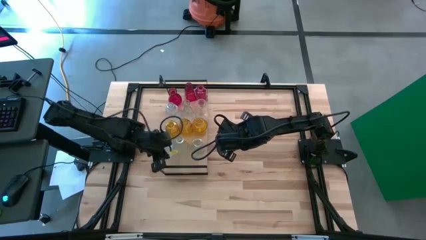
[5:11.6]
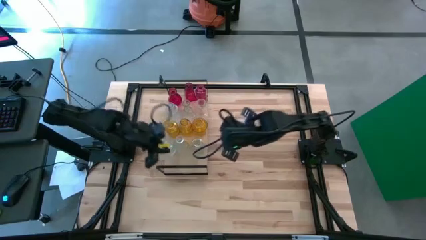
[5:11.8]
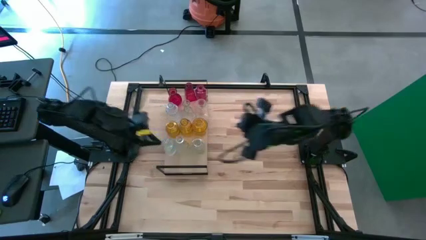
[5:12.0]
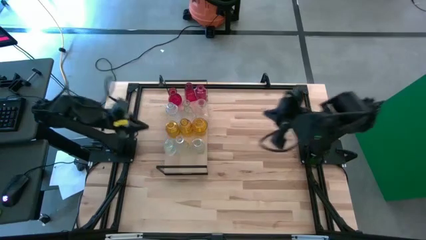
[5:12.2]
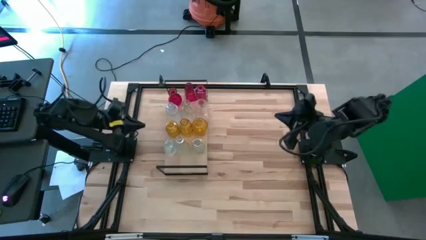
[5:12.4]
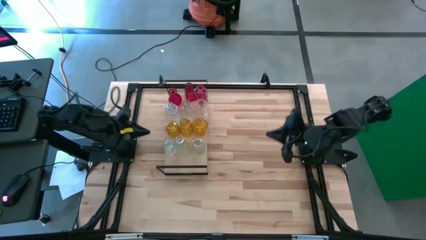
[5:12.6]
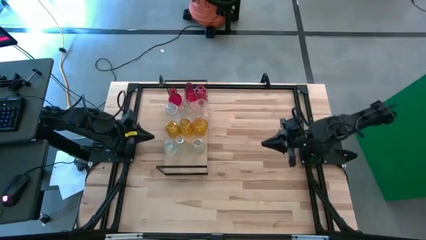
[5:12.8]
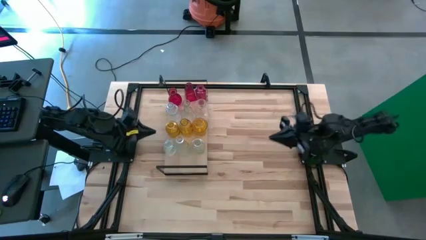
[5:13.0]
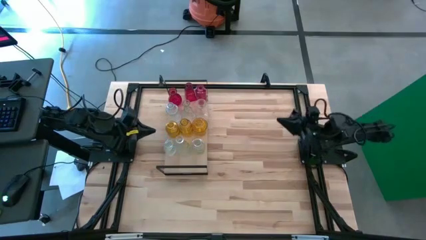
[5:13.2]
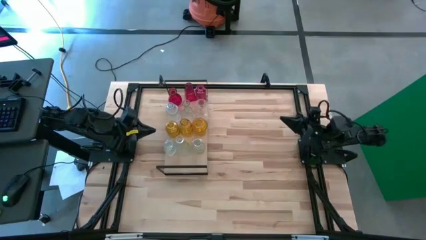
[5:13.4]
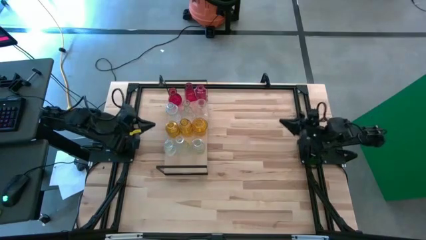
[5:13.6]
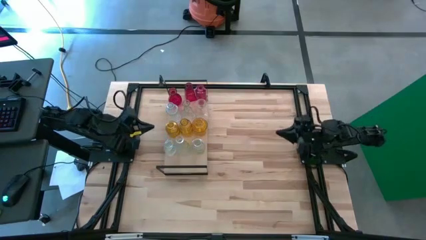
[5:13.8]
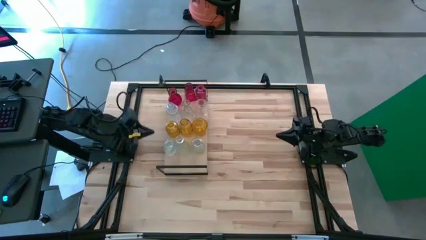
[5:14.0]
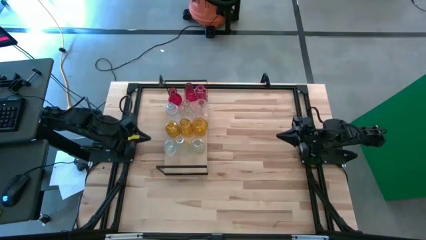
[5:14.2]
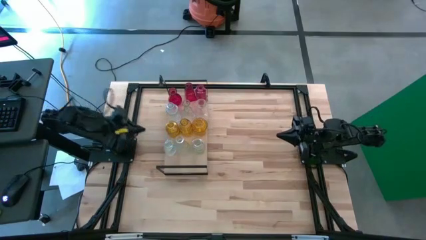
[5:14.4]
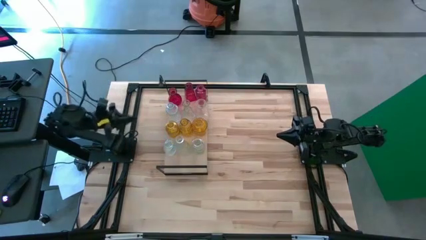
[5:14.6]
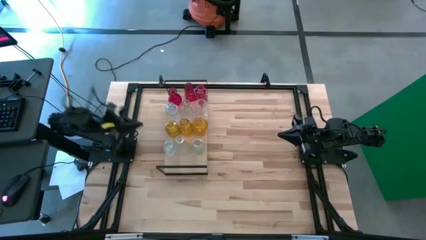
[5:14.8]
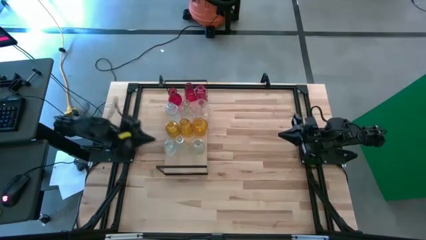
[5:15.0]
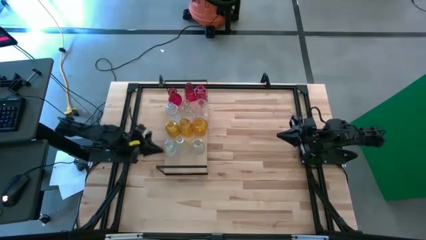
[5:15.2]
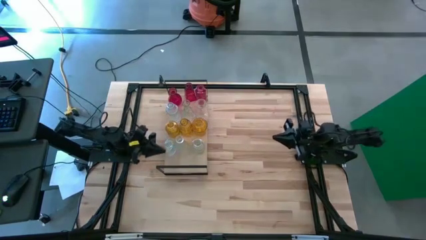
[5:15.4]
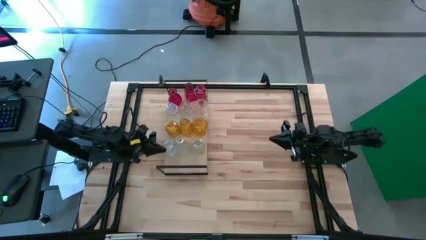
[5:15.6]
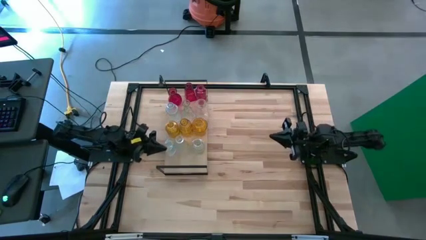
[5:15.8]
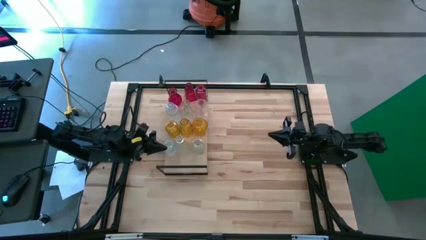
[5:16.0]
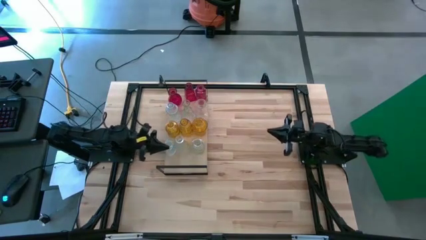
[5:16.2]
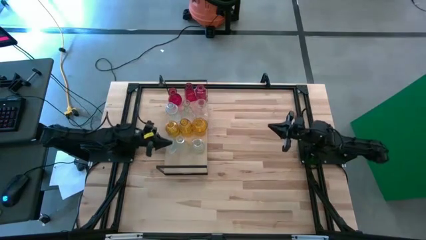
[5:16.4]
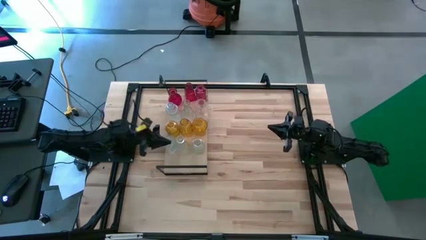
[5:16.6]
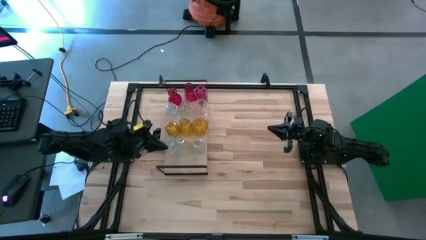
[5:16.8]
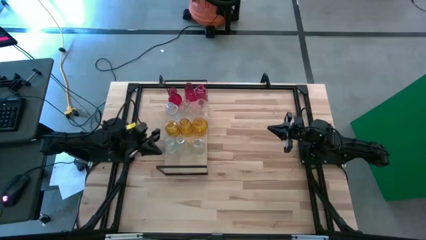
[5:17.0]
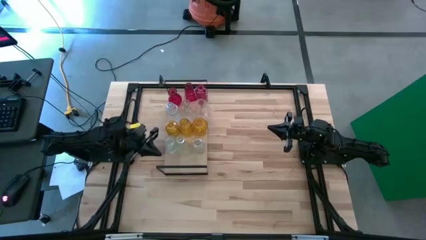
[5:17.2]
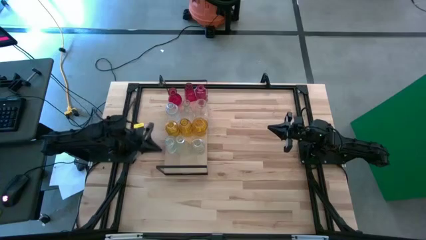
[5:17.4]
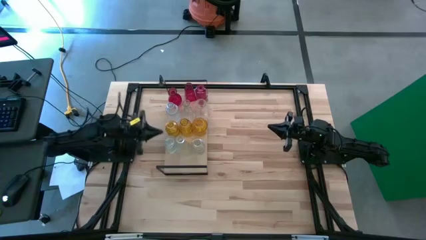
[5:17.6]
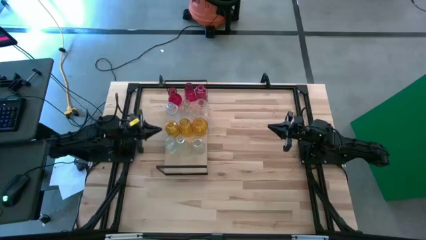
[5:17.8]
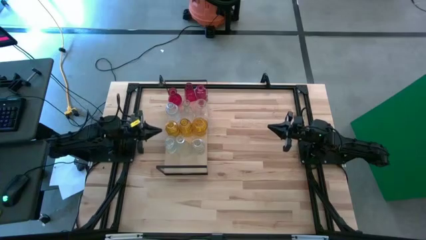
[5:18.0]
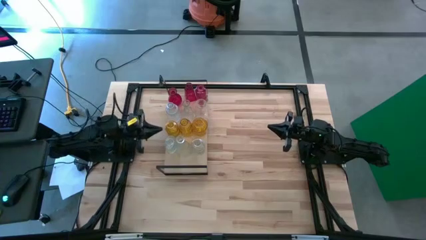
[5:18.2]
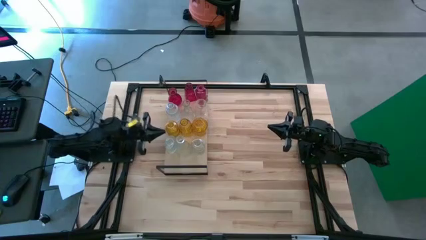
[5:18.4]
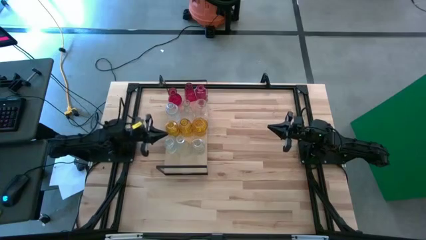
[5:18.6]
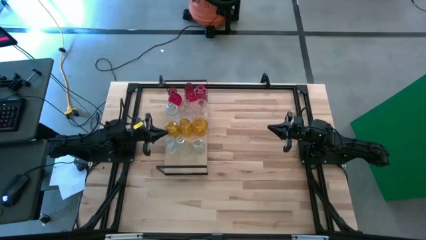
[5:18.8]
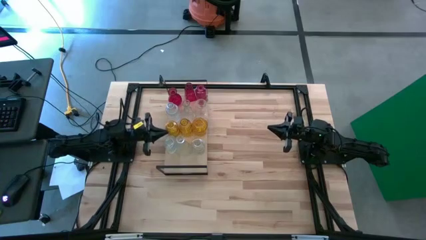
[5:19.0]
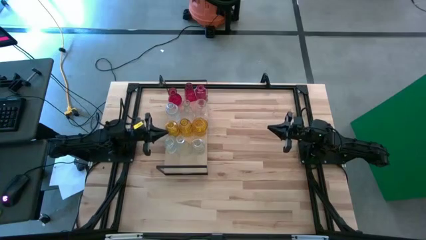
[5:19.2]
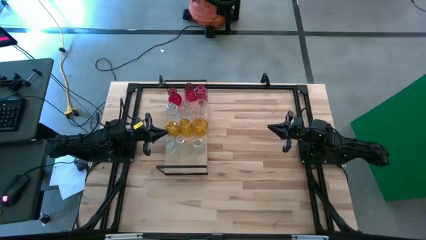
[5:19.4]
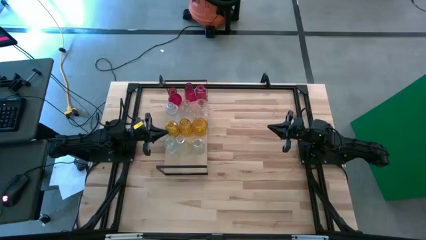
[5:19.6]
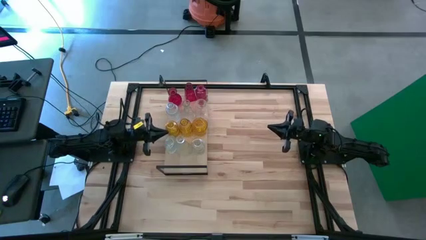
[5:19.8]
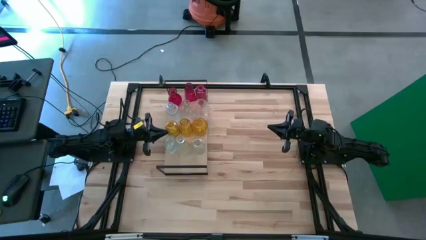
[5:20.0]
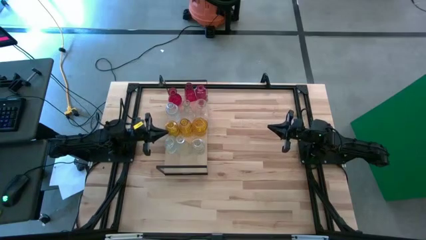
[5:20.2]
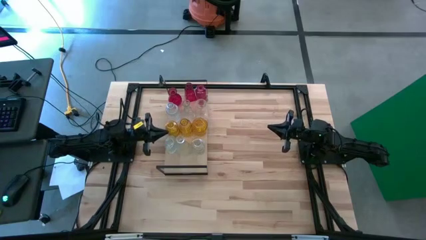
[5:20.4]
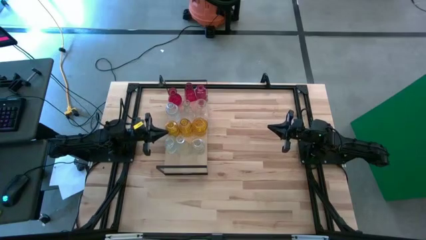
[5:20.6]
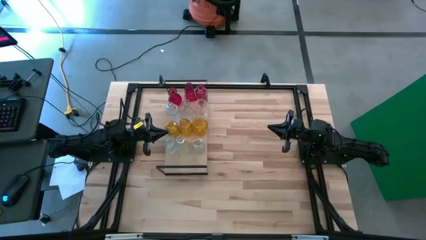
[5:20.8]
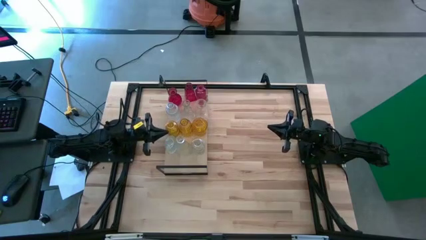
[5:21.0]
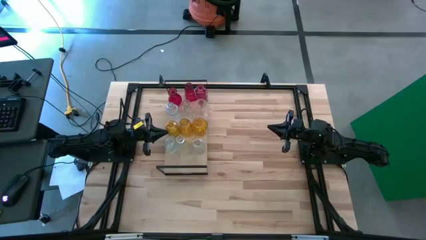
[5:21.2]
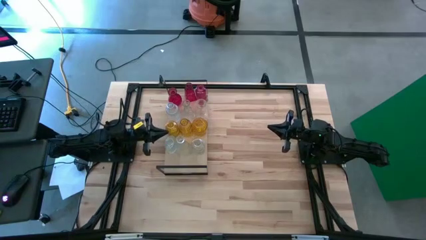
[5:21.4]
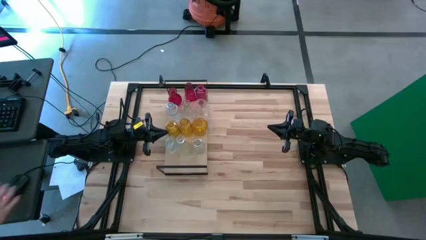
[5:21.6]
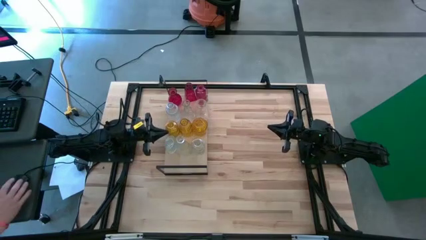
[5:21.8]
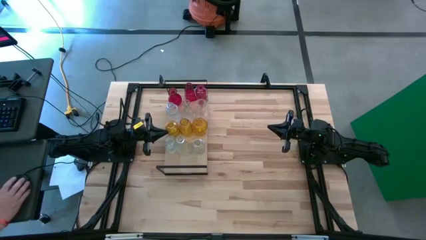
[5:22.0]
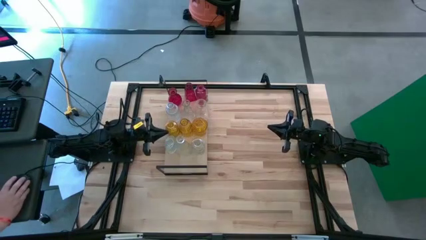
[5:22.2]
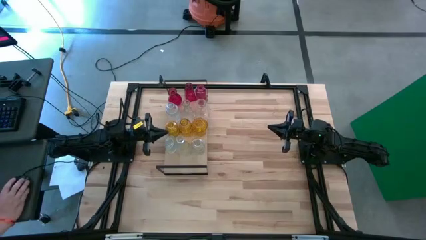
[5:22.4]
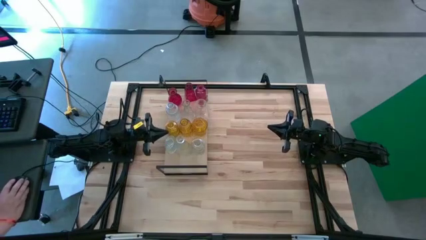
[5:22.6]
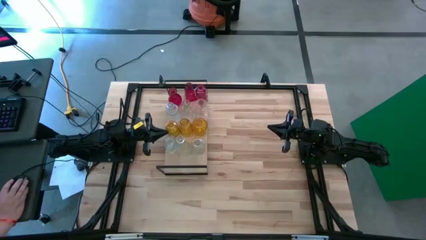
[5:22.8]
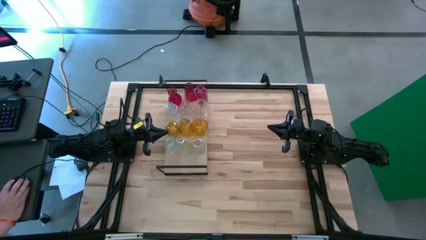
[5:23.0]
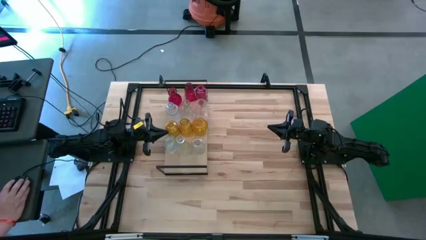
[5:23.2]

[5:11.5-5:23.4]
Task: sort vases onto shelf
Return to Home Position

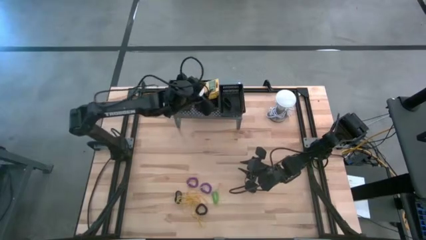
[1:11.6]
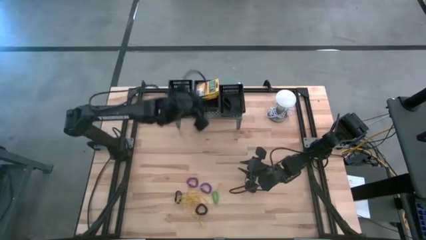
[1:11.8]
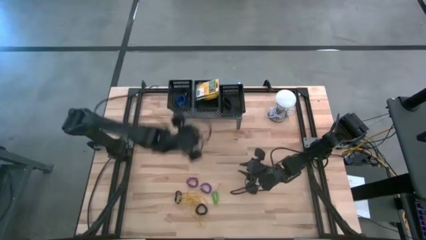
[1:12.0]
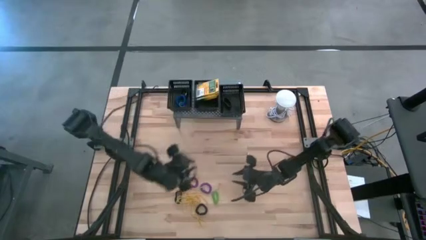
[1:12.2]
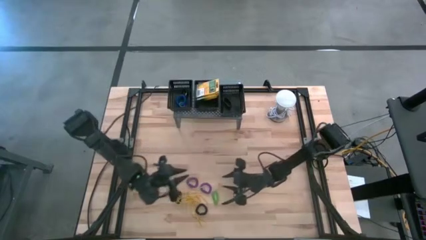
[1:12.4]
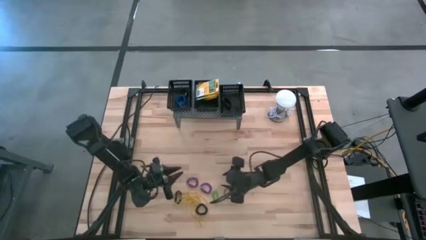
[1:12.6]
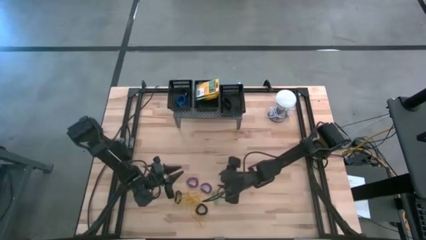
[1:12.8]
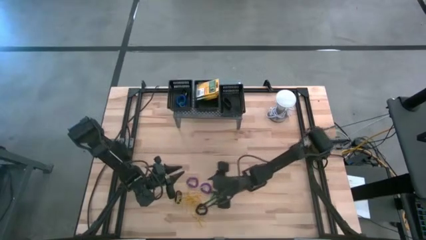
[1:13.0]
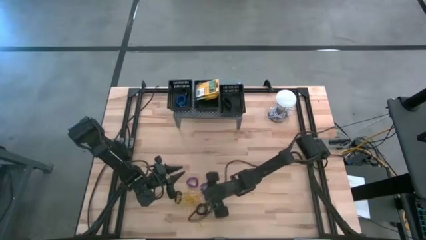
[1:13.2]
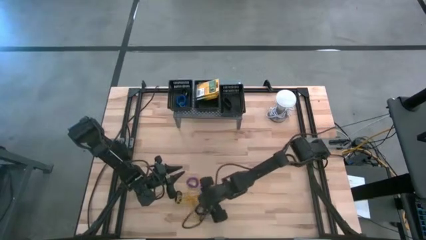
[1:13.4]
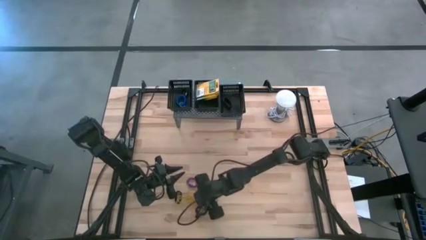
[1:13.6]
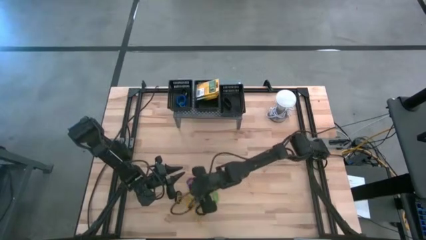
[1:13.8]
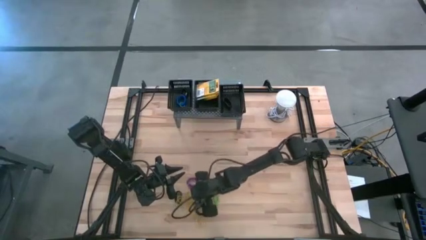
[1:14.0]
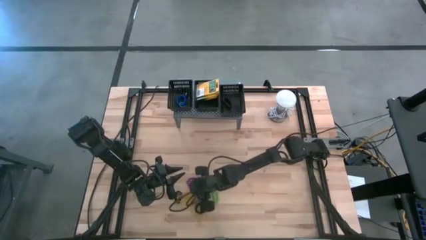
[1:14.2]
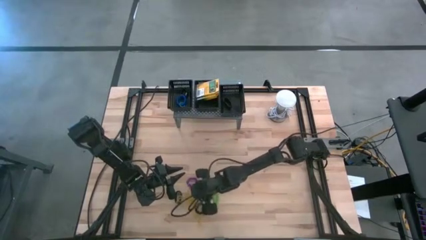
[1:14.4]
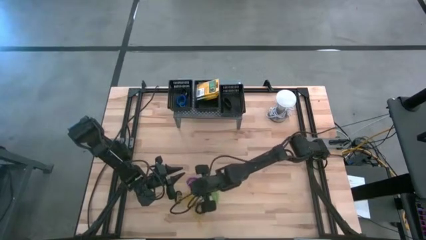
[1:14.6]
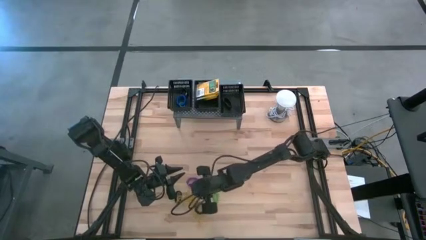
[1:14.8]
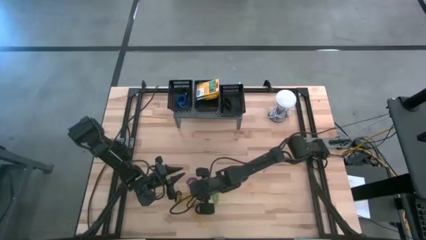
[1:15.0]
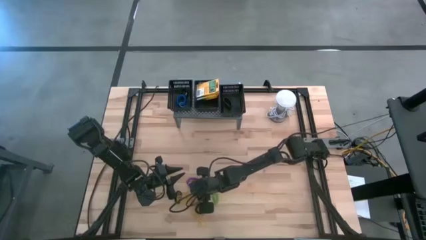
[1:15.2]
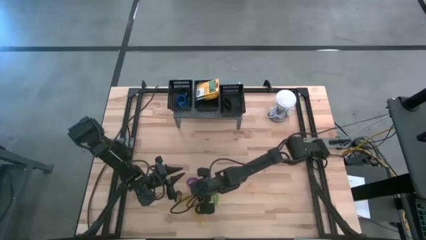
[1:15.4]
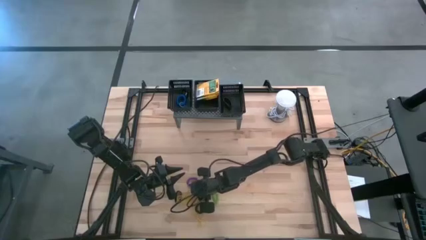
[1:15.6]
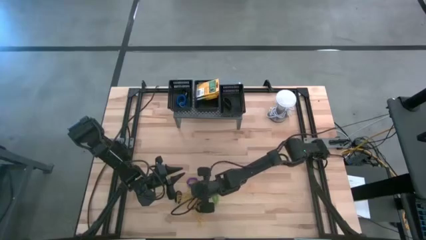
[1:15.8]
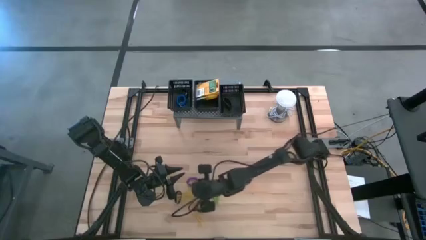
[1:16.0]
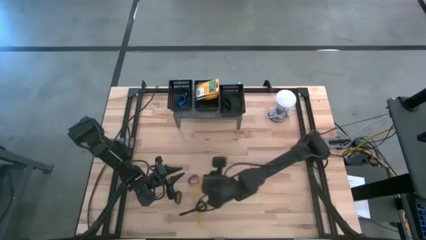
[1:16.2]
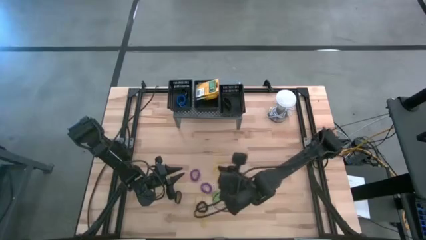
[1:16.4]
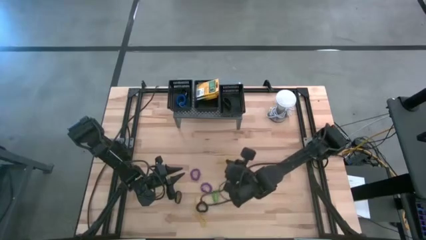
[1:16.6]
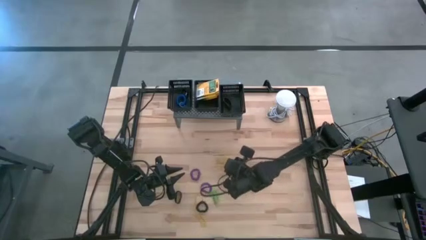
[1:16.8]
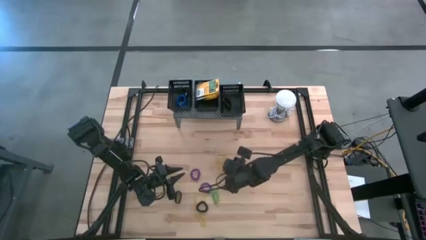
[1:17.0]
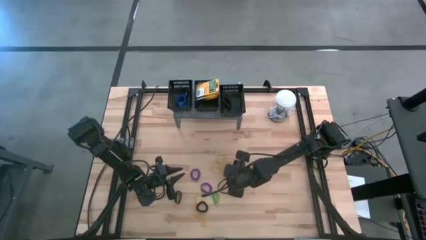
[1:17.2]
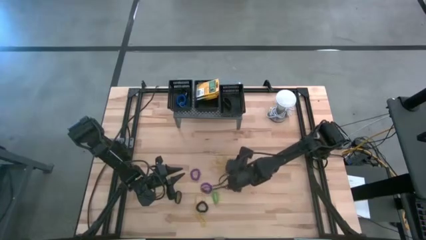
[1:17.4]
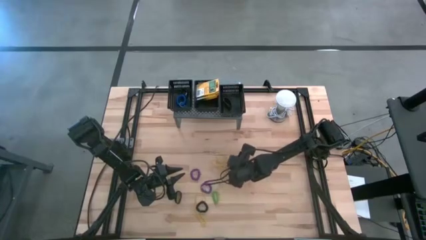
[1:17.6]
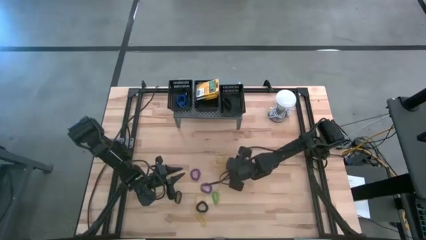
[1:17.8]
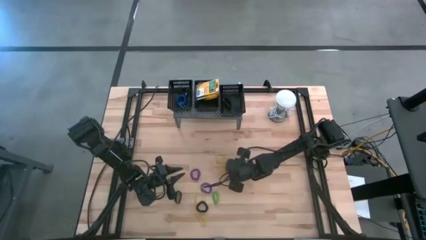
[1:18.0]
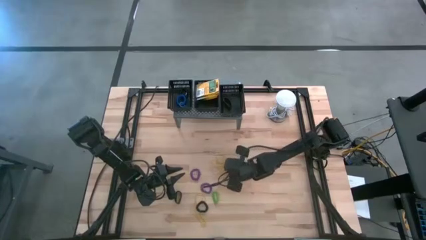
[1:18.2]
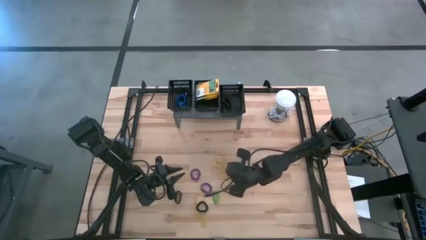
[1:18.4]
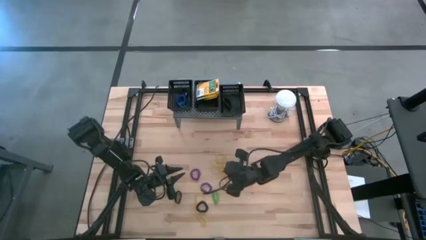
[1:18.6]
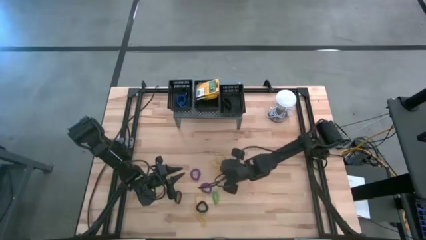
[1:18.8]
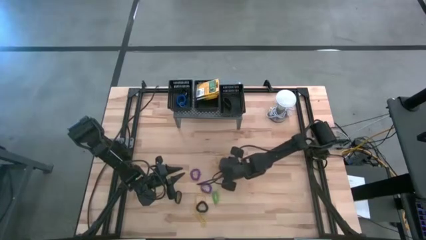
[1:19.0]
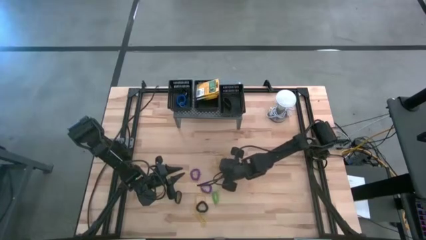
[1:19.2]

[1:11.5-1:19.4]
Task: Pick & Place Office Desk Supplies
Put the yellow rubber band into the right black bin on the shelf
